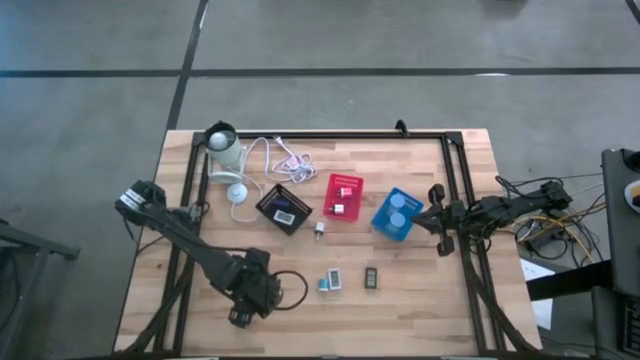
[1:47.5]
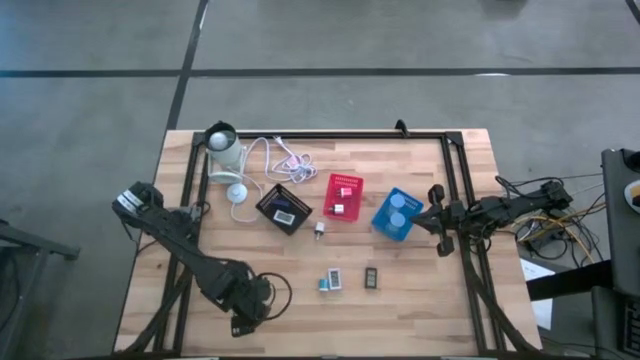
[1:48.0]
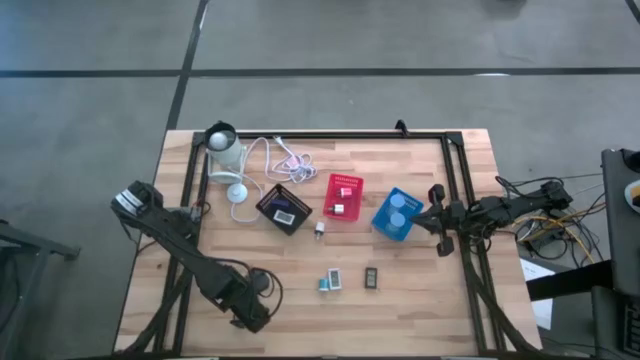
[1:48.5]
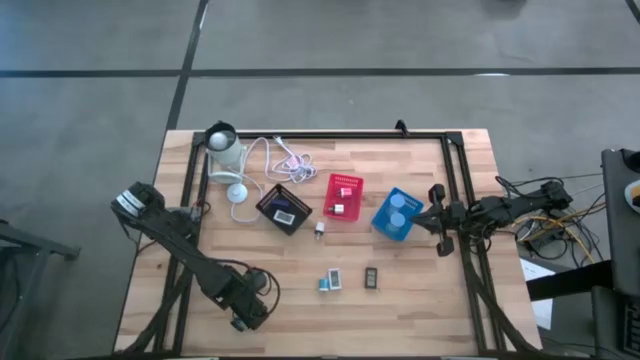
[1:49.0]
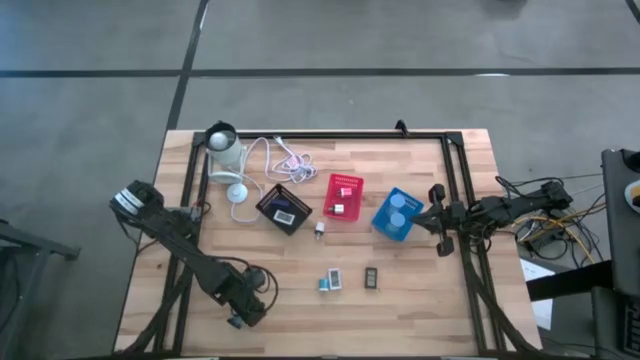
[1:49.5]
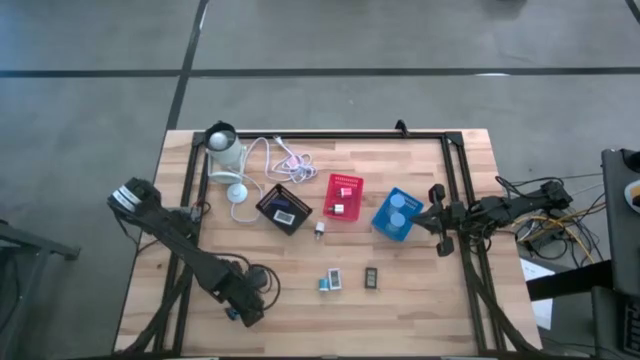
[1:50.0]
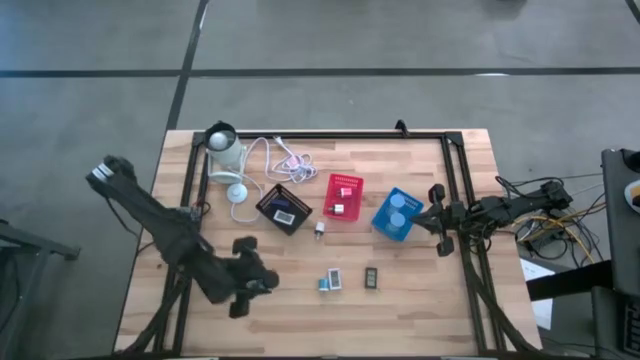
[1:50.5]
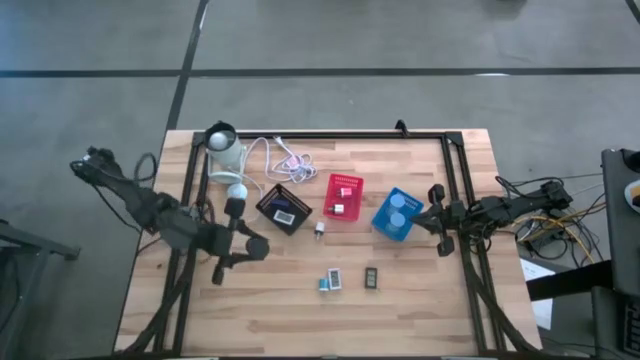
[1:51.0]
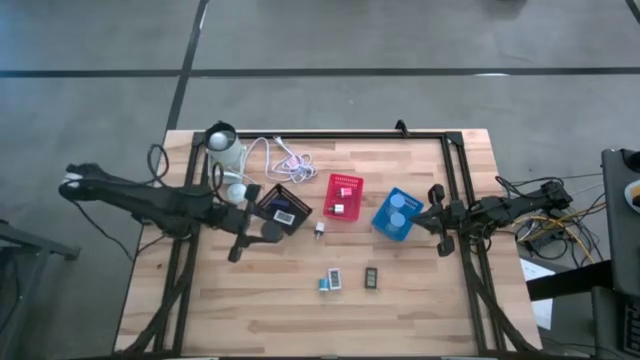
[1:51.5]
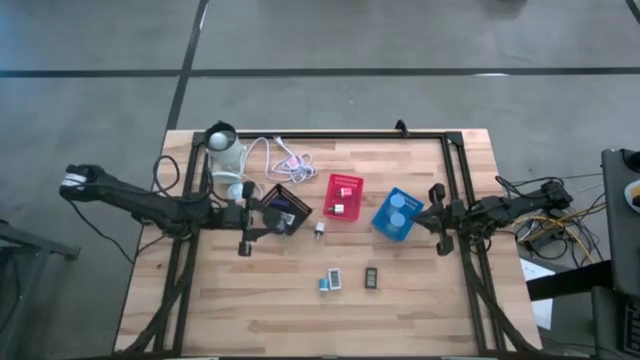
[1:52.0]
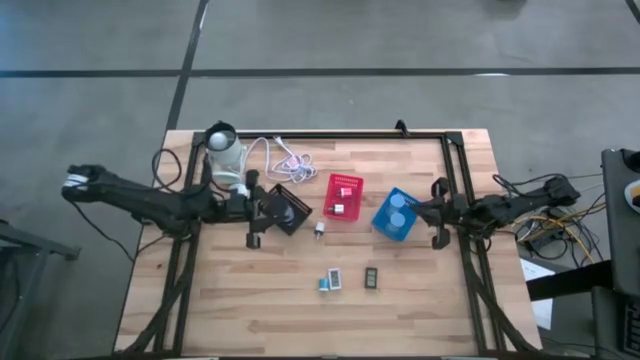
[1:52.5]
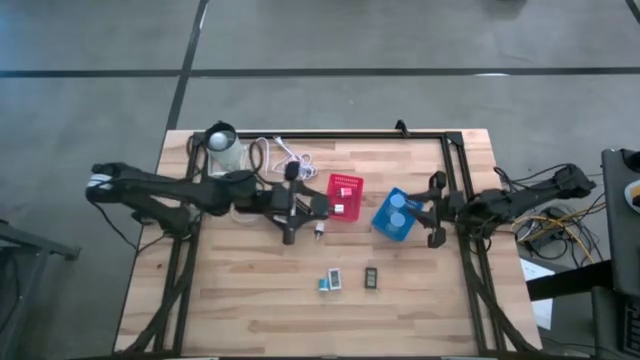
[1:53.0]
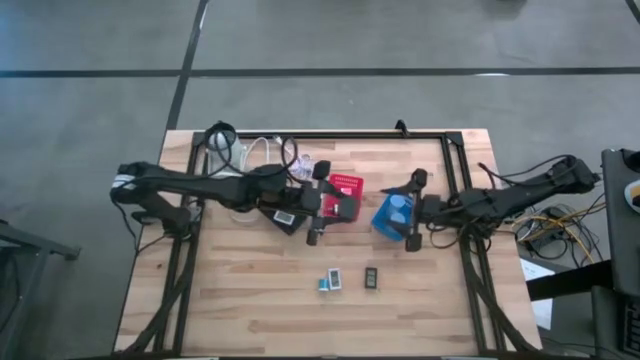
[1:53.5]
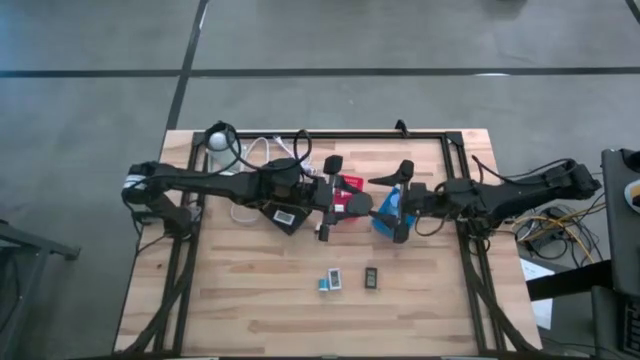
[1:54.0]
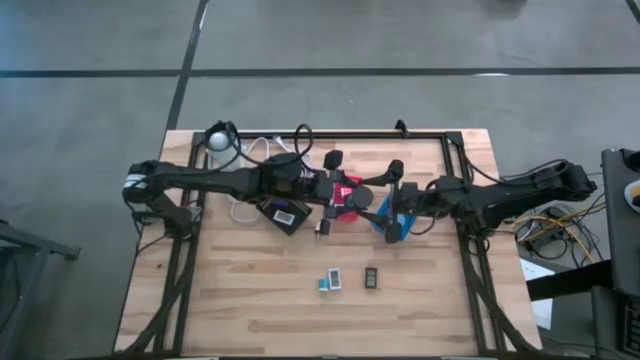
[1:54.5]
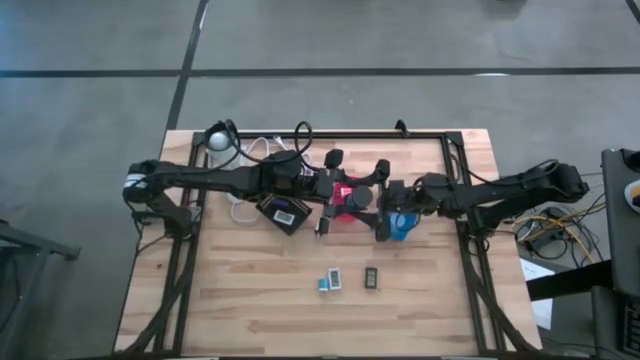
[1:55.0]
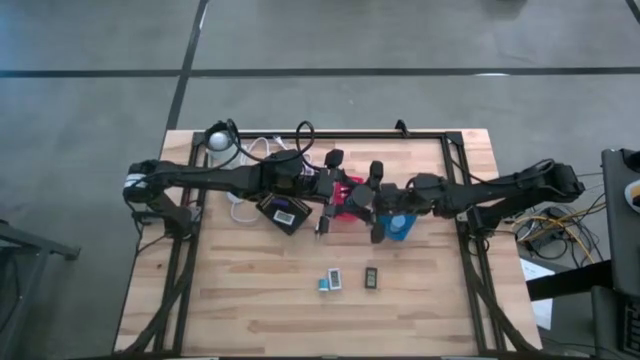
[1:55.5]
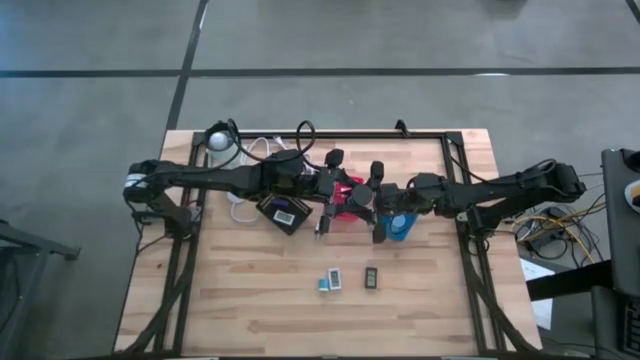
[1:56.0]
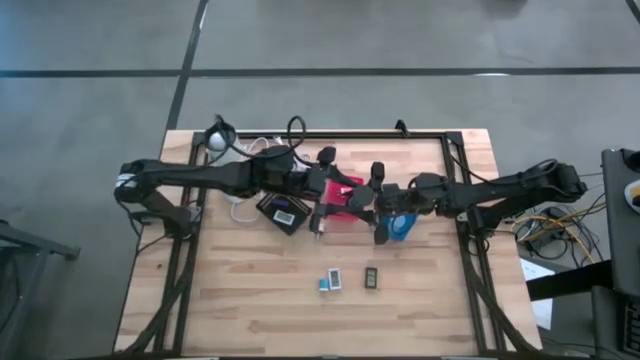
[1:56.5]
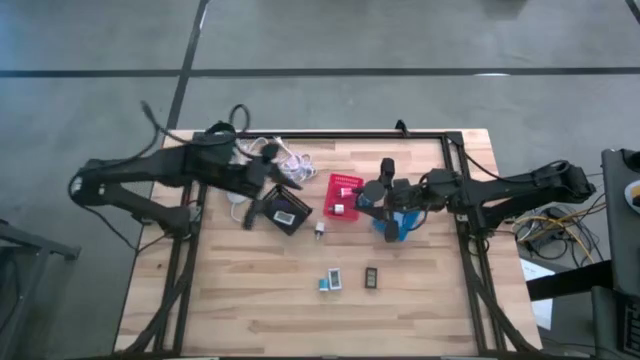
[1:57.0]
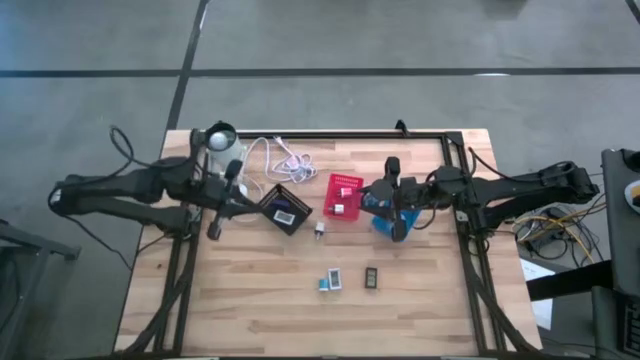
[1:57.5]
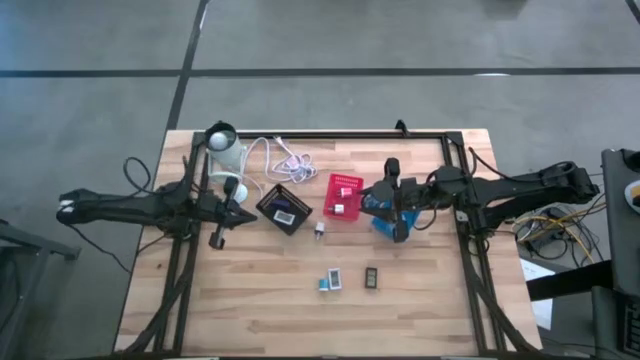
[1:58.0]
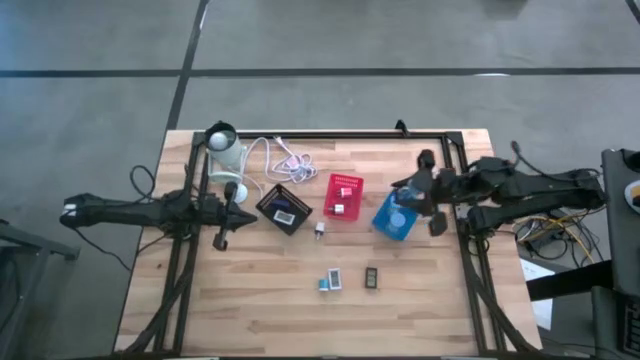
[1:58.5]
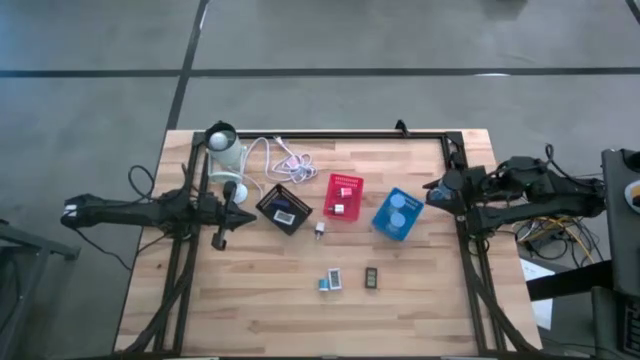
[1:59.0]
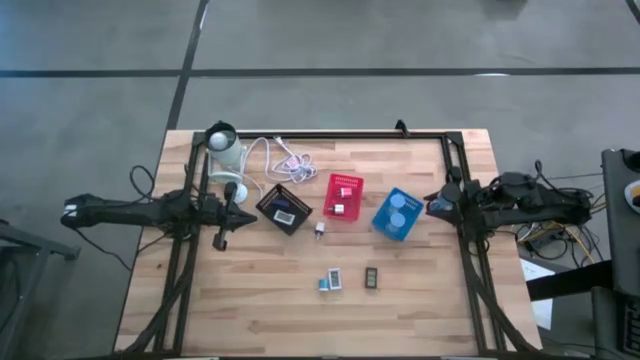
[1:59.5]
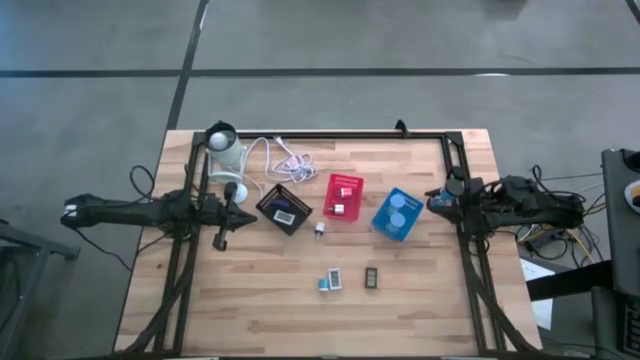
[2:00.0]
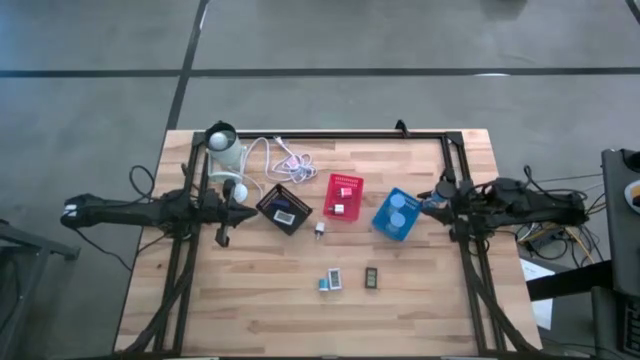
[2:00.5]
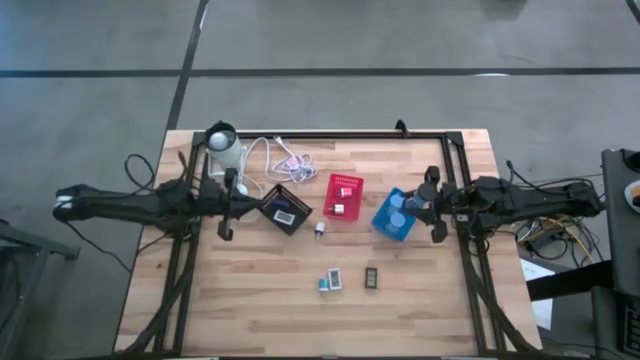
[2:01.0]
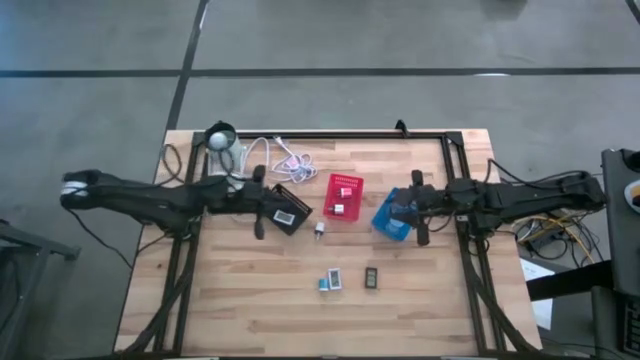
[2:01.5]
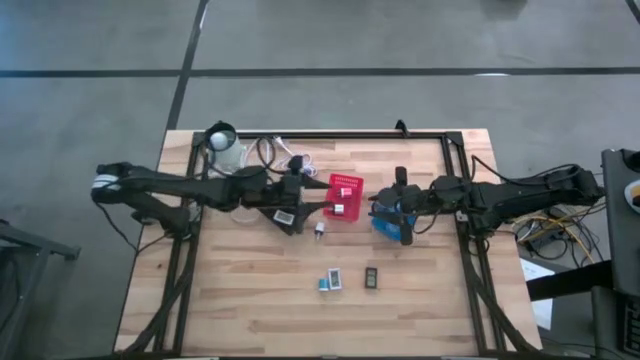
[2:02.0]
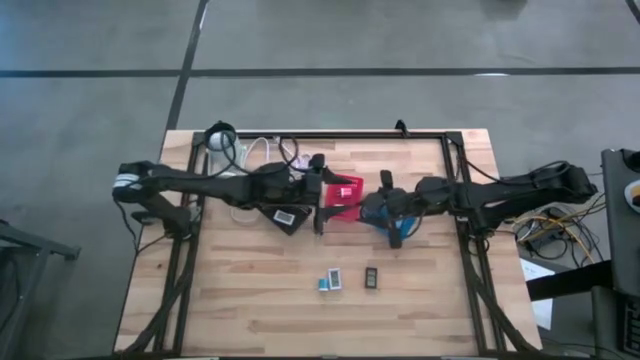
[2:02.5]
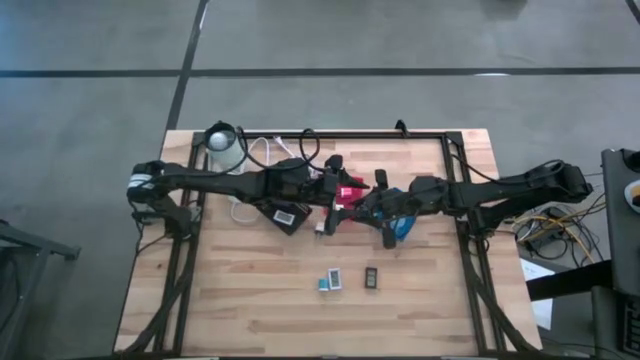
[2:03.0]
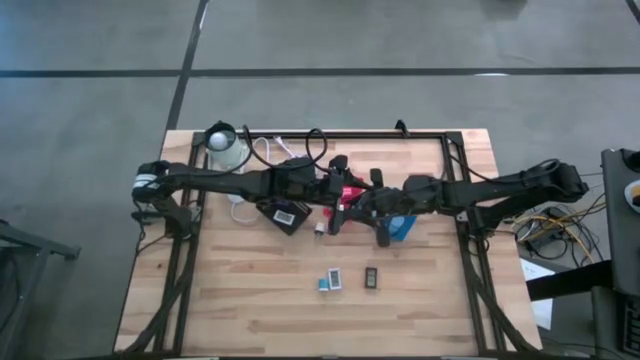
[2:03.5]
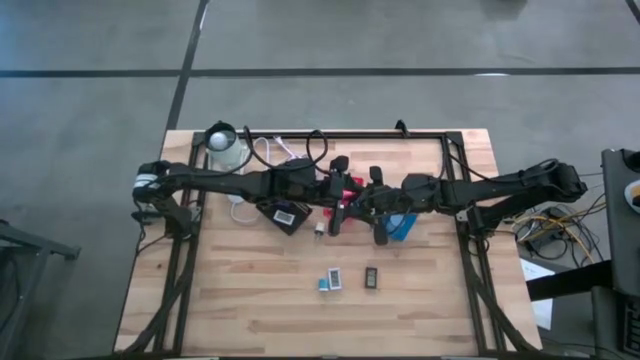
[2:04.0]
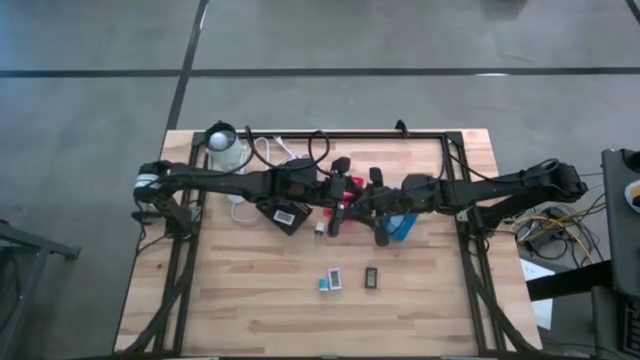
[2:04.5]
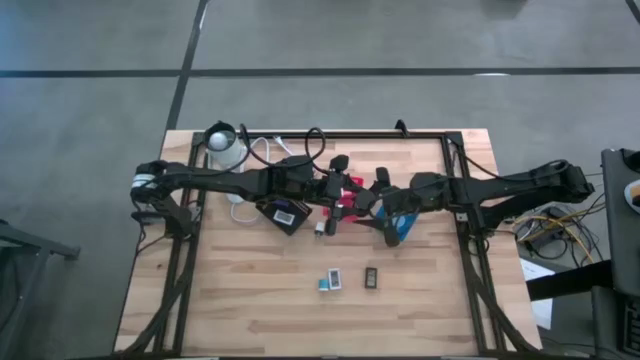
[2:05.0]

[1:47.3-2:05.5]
Task: Pick & Place Office items
Put the black hourglass into the blue basket

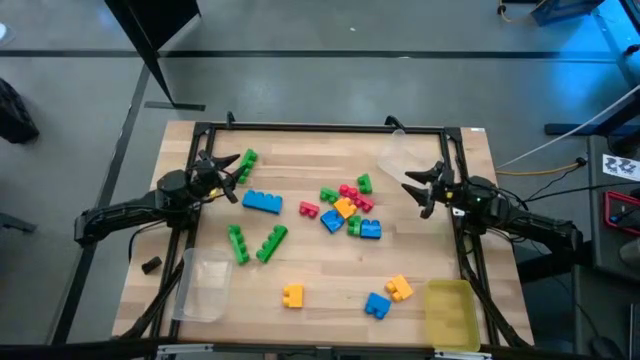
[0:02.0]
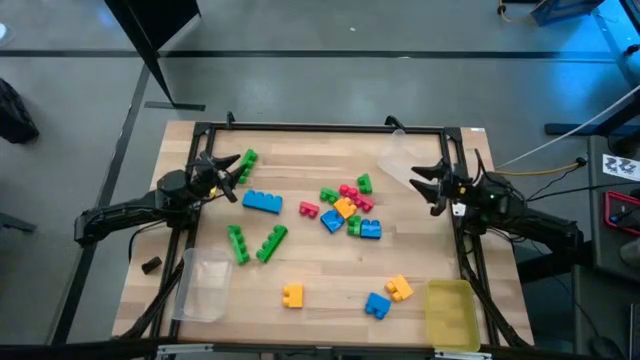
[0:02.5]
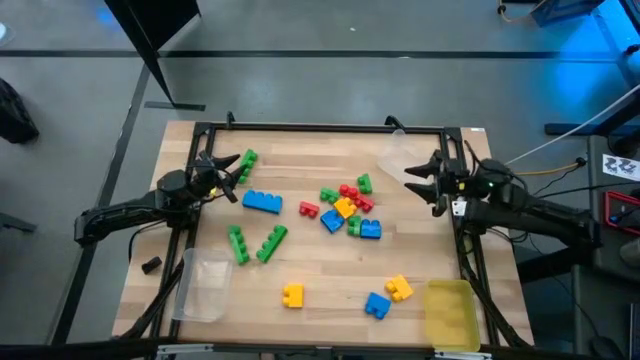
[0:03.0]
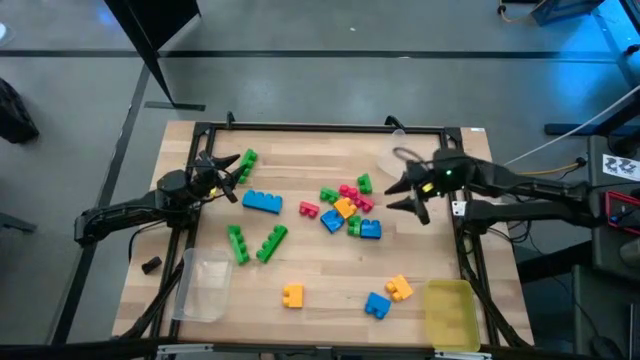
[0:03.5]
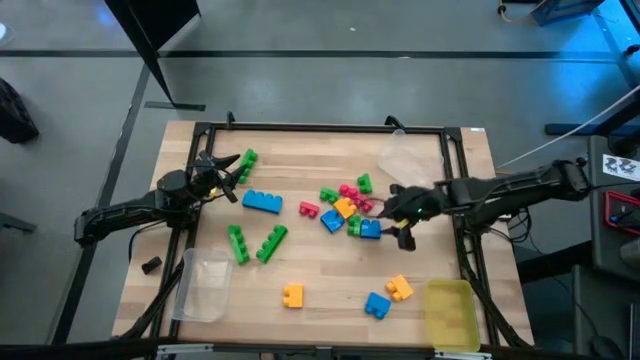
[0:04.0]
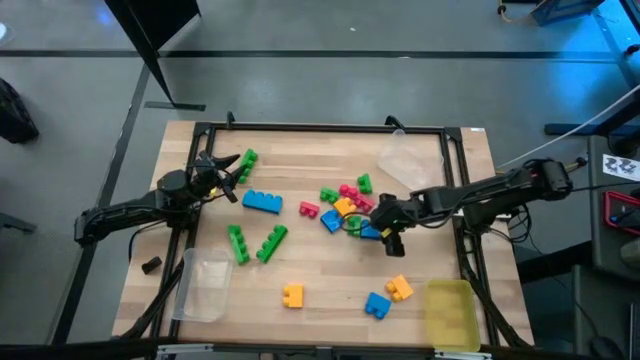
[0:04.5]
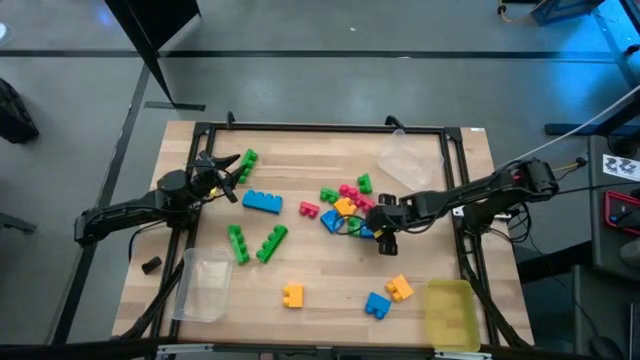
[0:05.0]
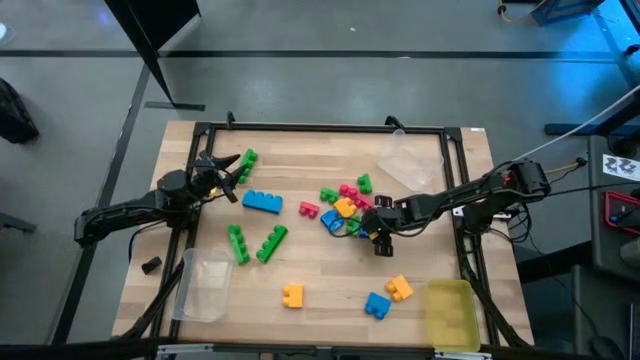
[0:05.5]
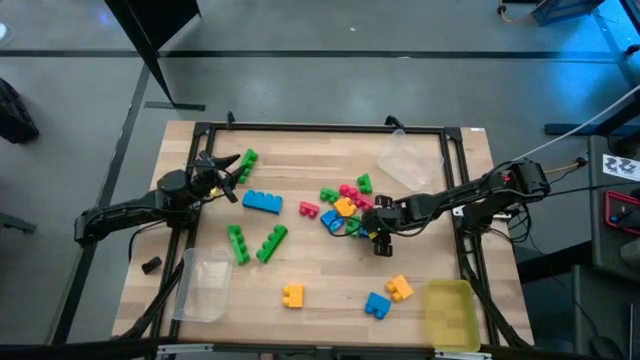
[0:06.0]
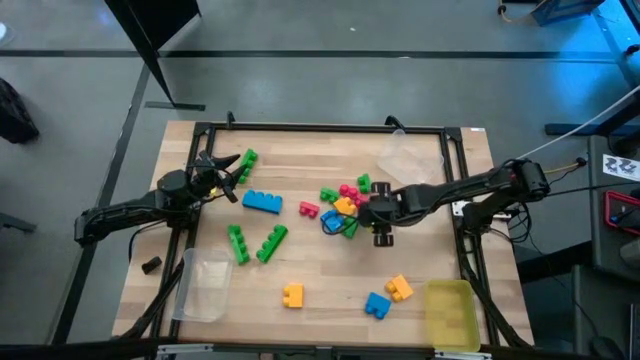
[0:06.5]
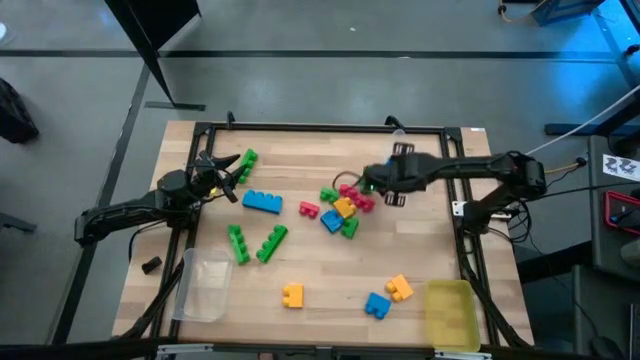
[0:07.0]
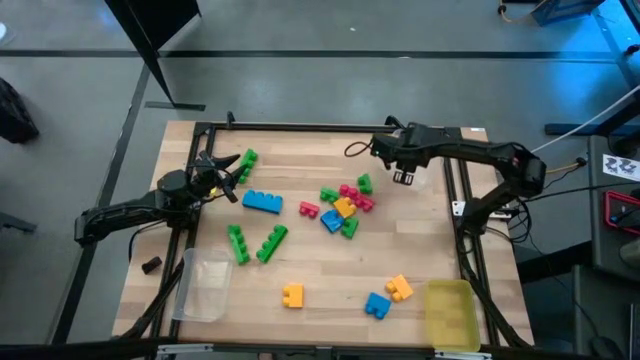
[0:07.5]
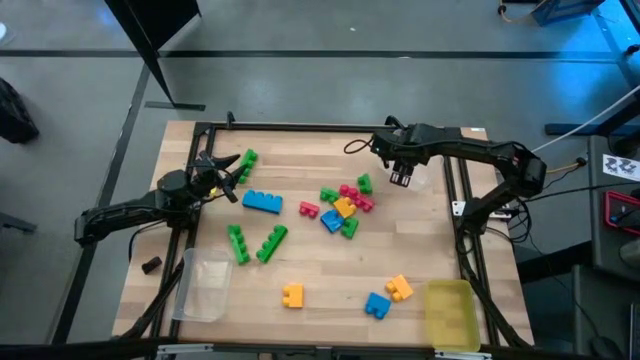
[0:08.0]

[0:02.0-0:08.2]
Task: Sort blocks by size
Put the top right 2 stud blue game piece into the top transparent bin
